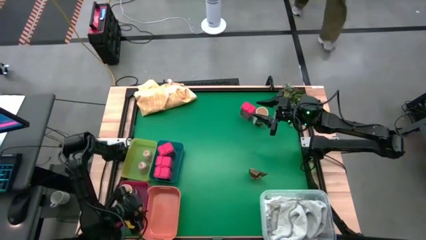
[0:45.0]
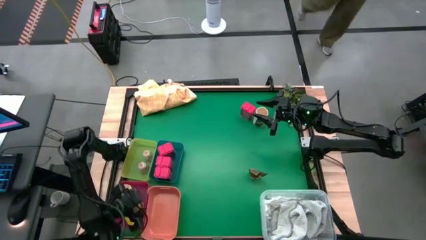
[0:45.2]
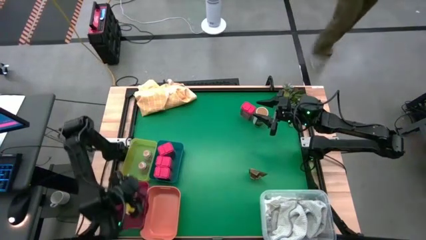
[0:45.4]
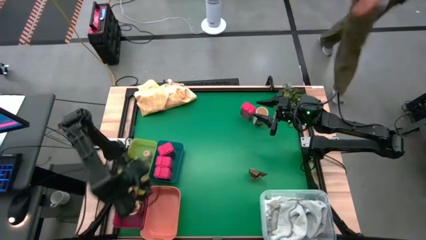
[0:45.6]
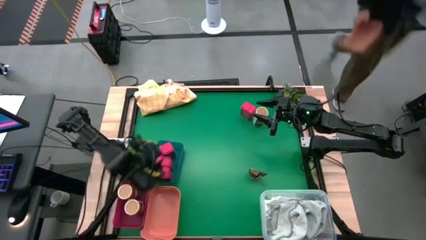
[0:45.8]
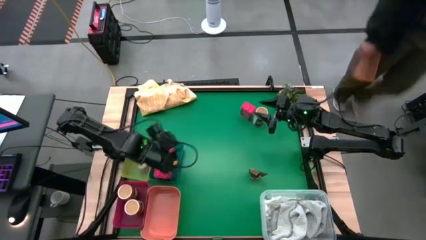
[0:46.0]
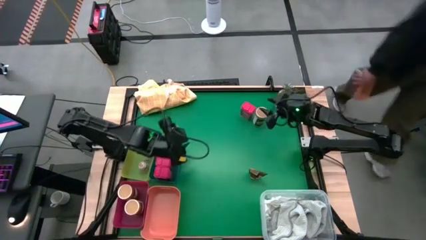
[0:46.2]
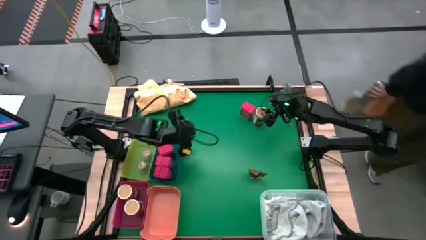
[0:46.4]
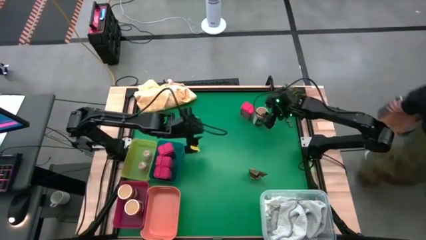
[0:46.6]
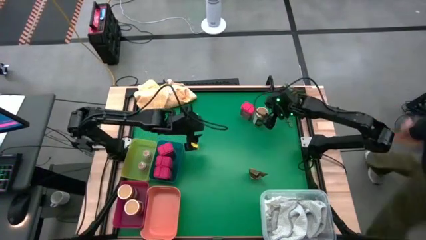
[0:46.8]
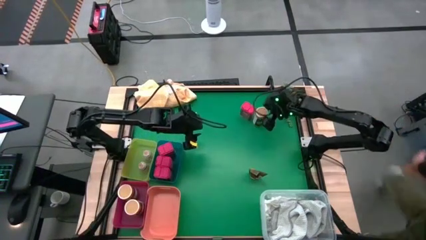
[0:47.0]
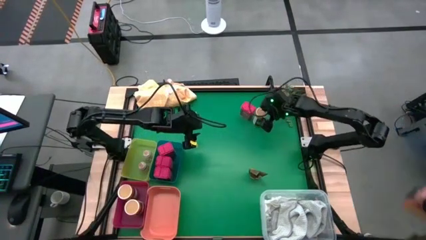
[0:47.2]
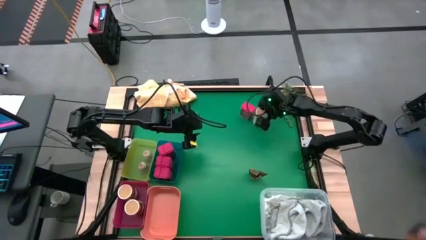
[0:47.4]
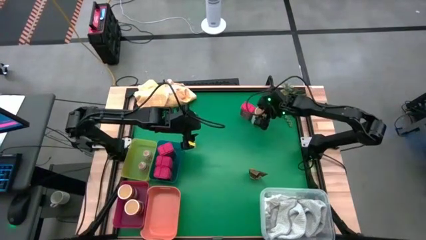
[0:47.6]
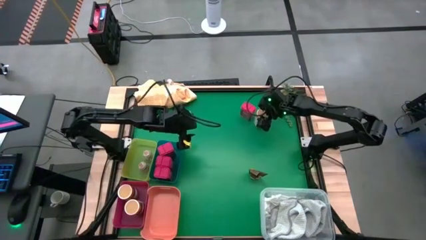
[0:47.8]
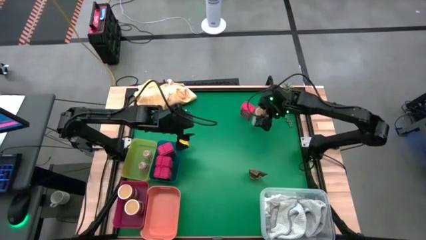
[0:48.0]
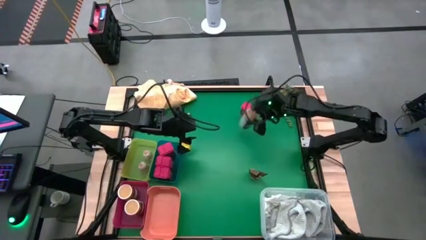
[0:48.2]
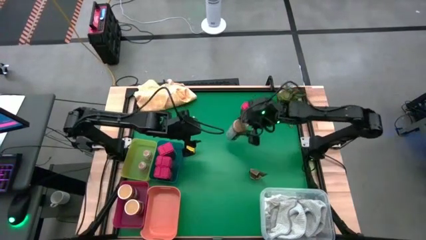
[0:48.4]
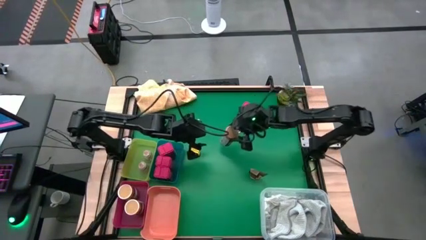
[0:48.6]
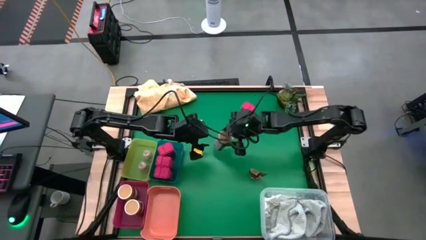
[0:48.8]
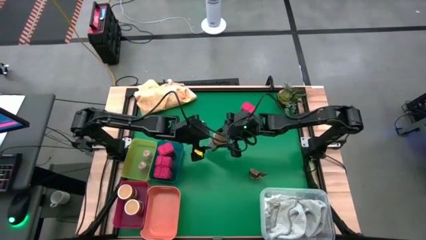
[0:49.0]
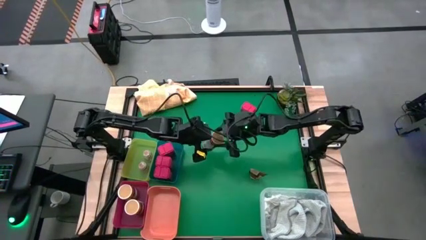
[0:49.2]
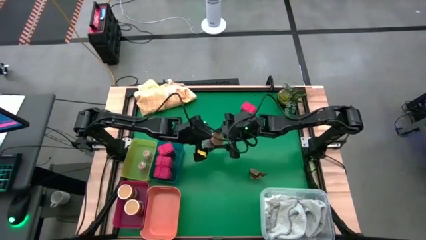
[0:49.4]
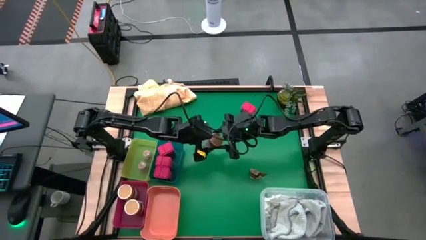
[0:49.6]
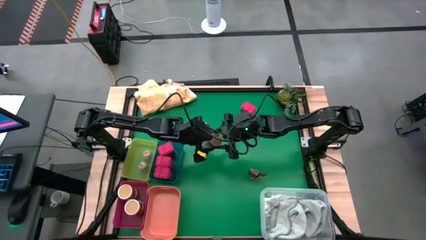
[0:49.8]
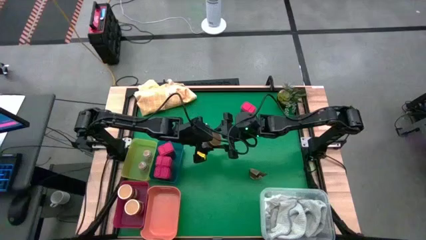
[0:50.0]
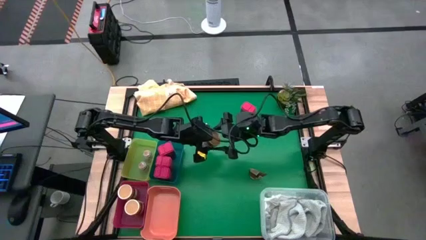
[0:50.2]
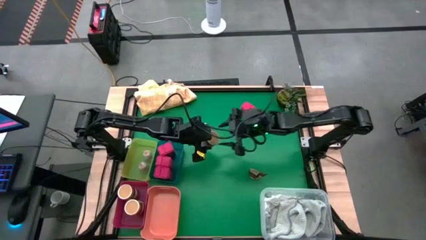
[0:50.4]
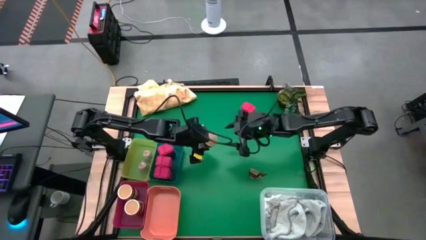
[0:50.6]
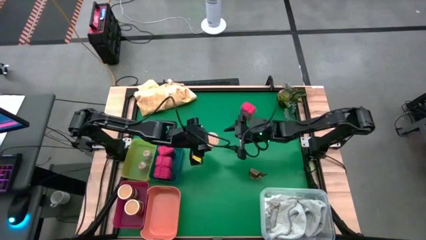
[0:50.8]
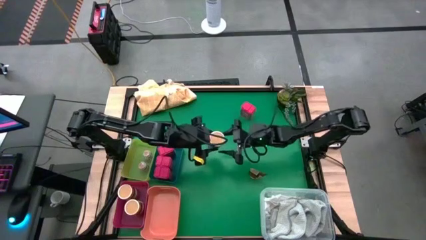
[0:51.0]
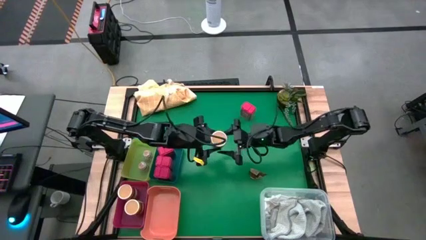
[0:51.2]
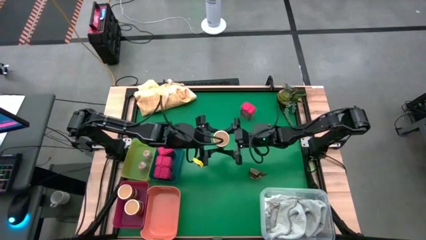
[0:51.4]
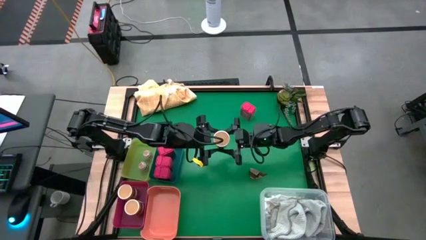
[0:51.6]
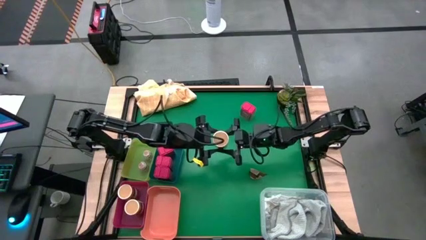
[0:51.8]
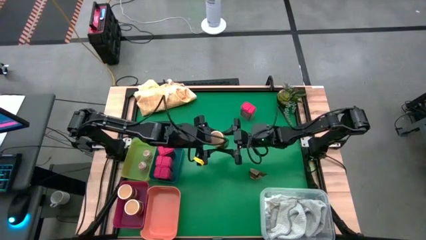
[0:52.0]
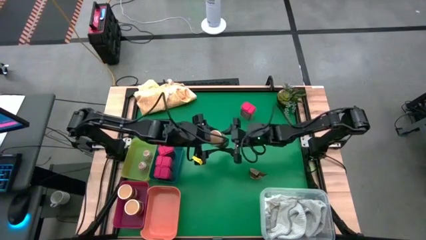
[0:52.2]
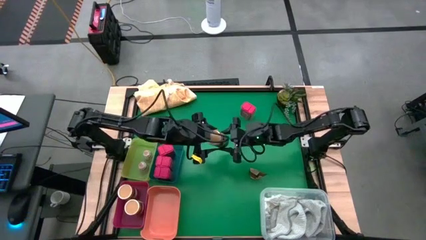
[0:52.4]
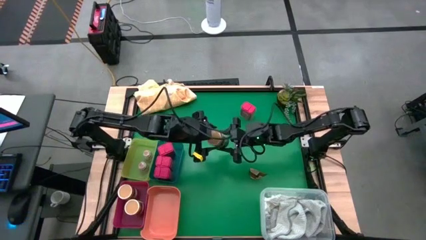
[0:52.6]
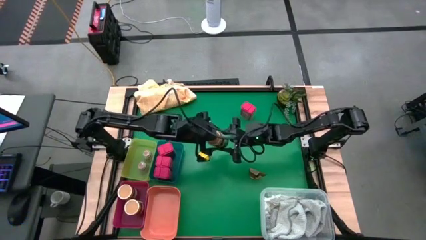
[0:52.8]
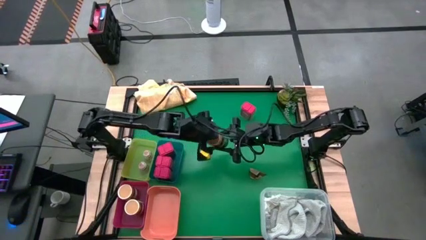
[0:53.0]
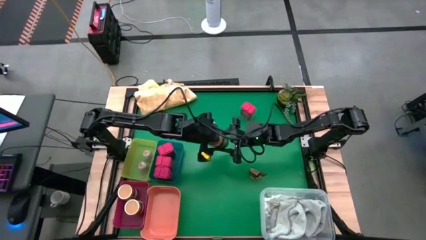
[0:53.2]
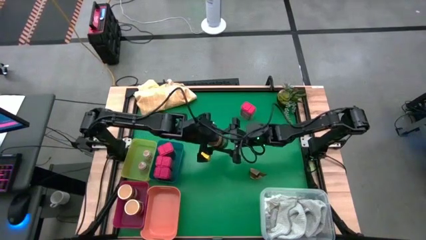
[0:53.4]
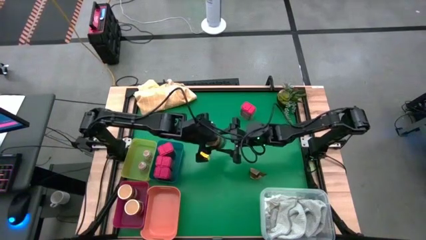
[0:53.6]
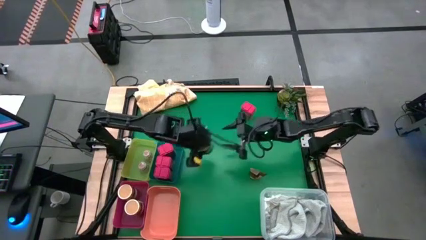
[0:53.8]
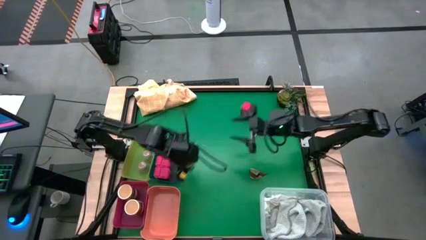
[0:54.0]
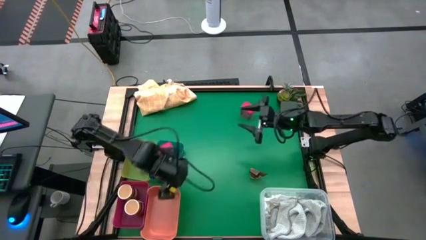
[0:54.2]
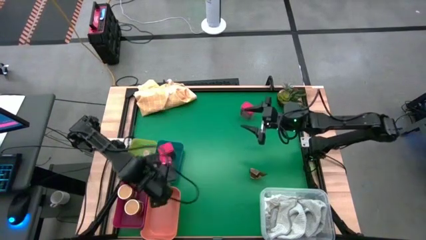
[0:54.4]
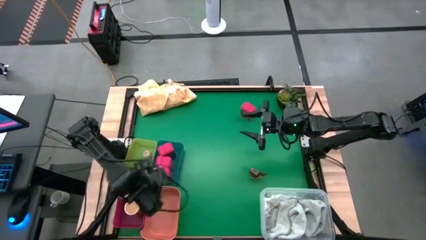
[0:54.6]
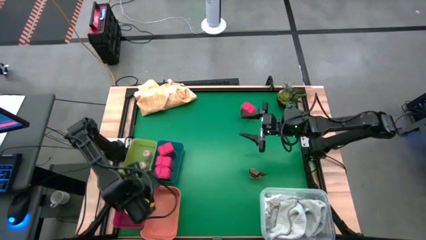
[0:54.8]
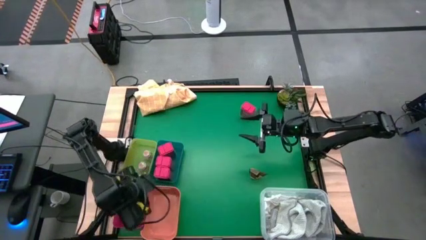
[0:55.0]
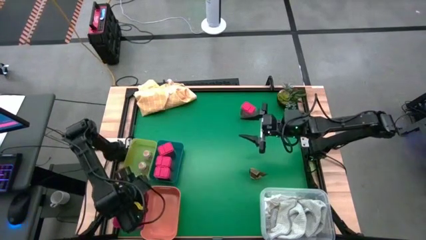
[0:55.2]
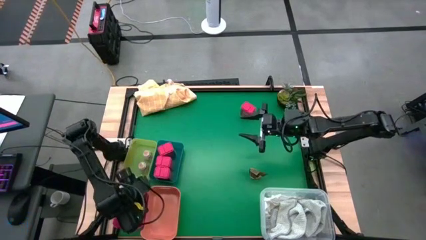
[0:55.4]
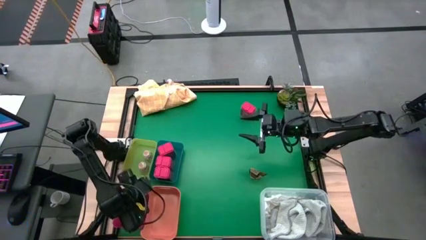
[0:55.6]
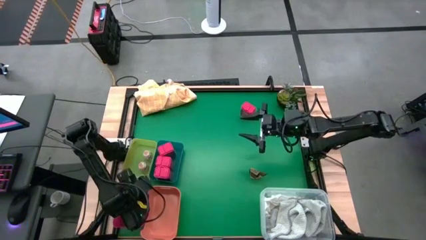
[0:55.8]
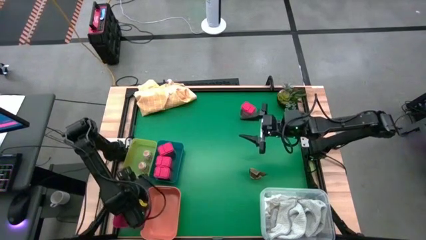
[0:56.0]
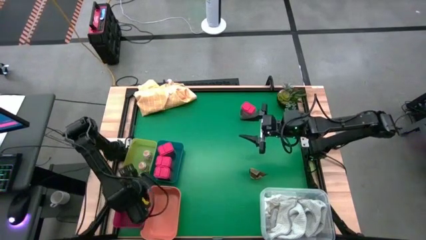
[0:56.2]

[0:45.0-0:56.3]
Task: Sort spices by type
Put the gold seasoning bottle into the red bin
